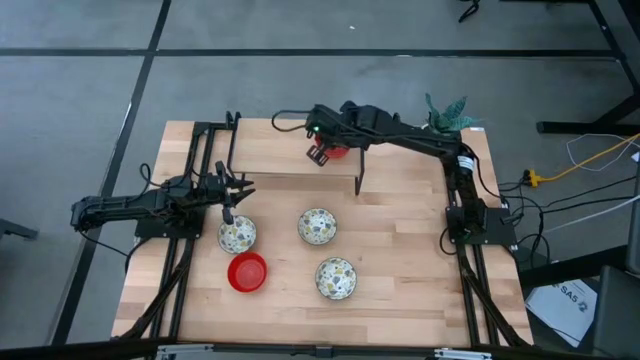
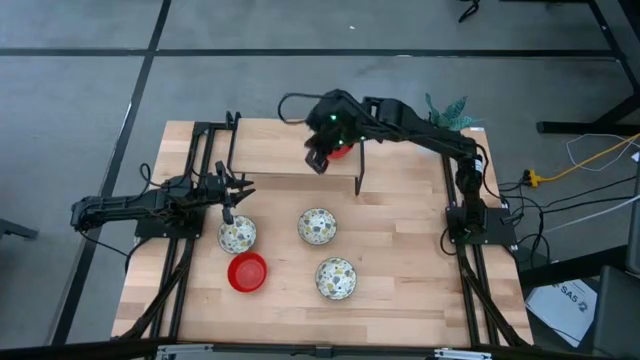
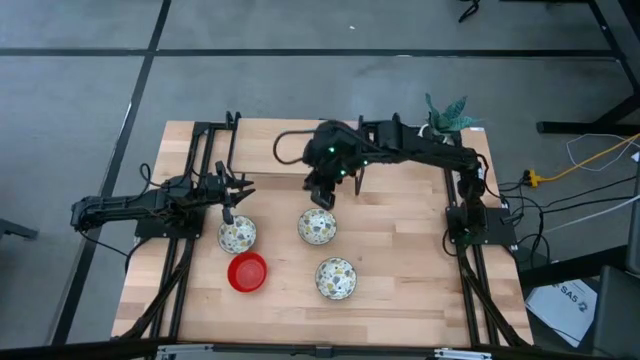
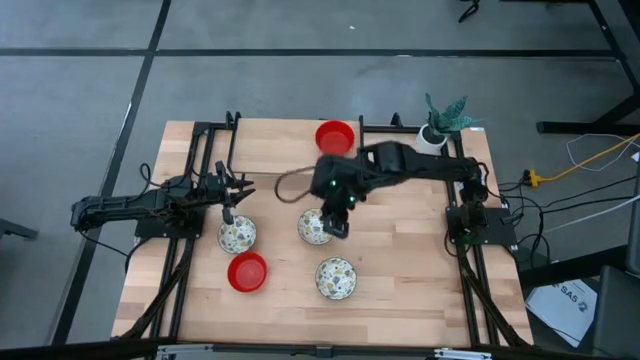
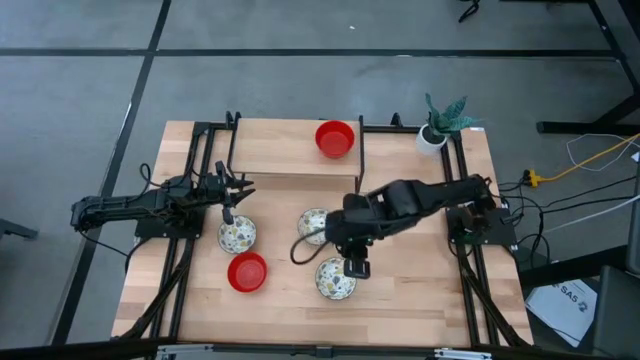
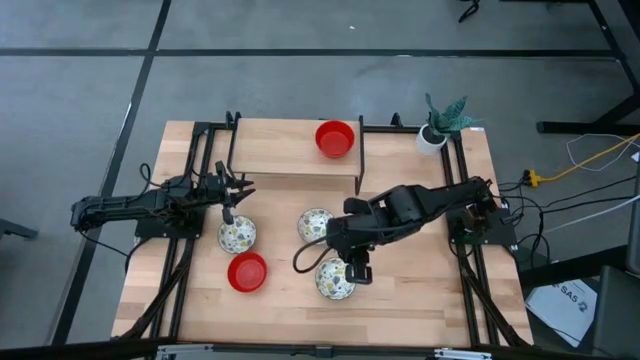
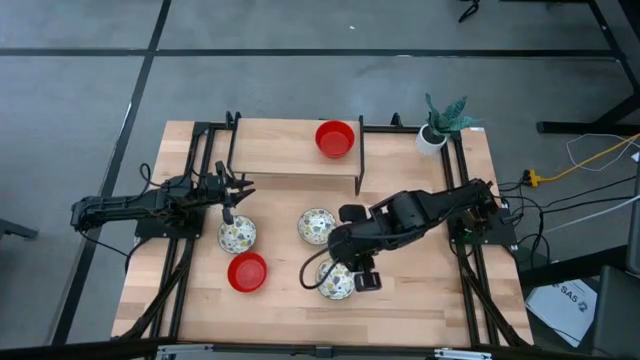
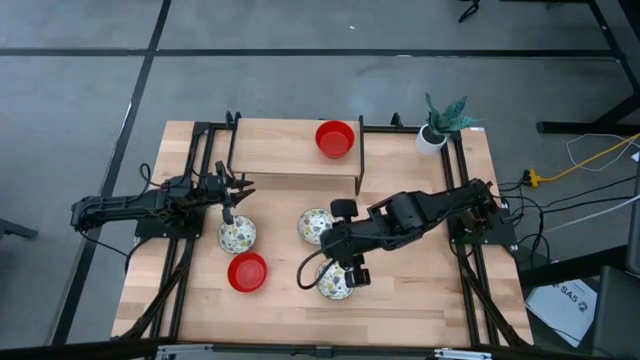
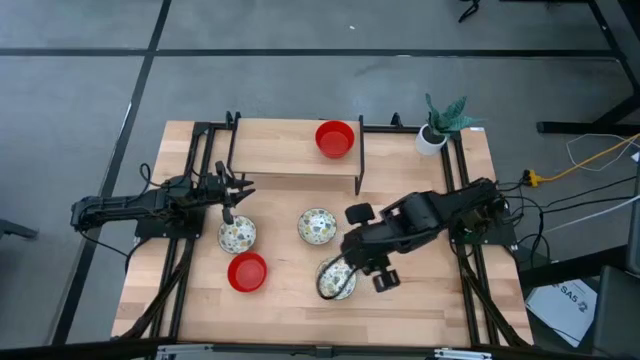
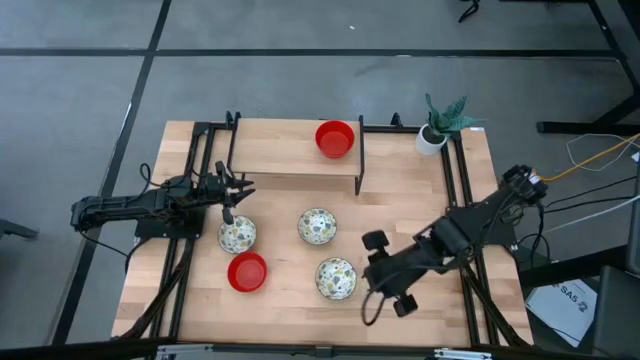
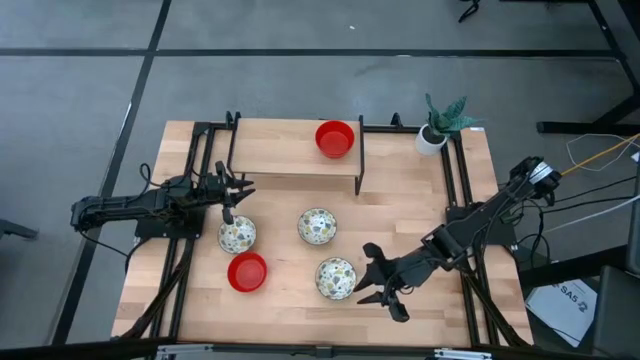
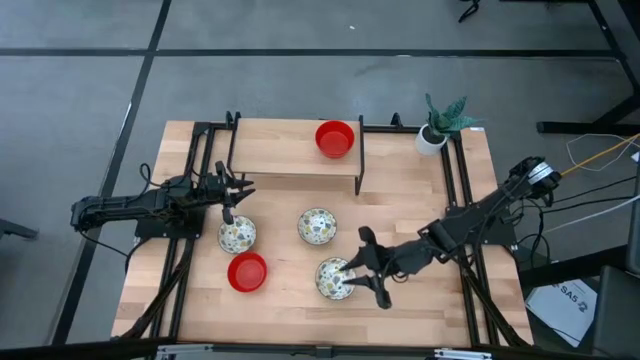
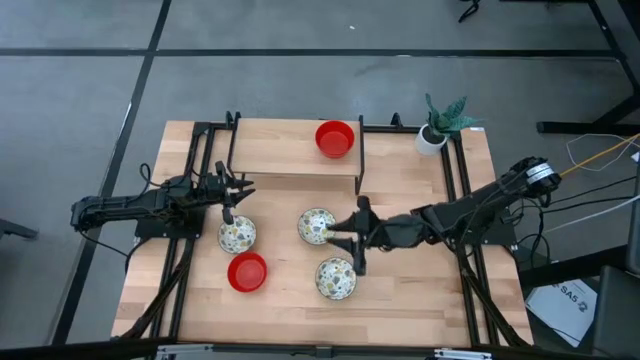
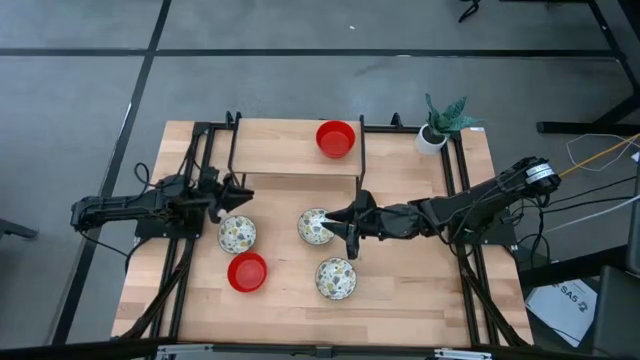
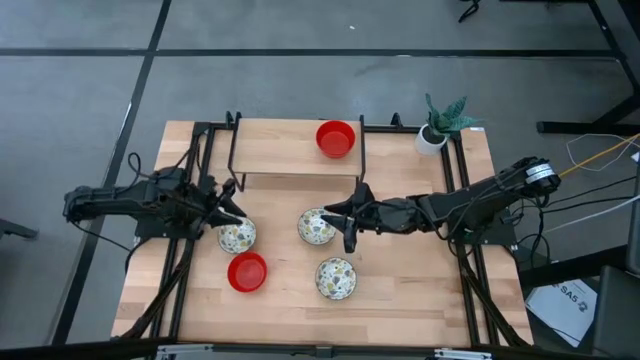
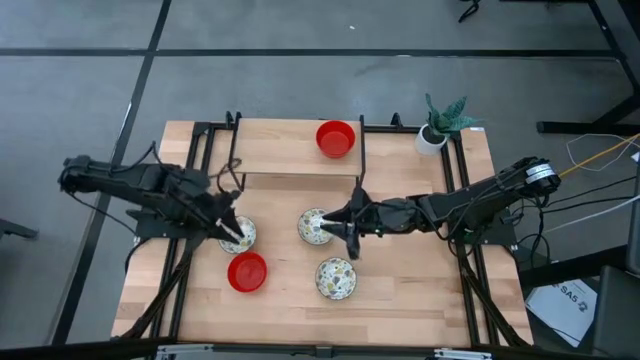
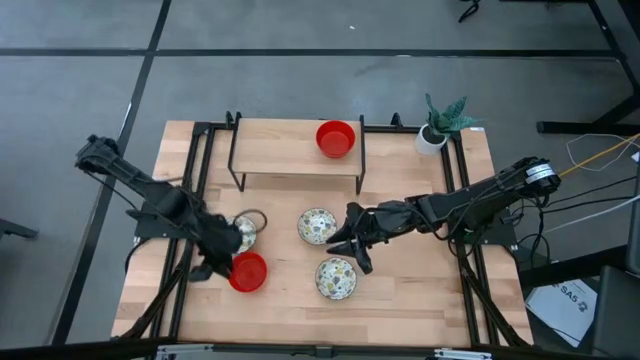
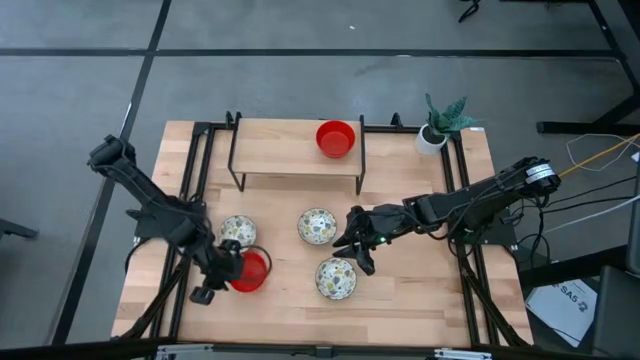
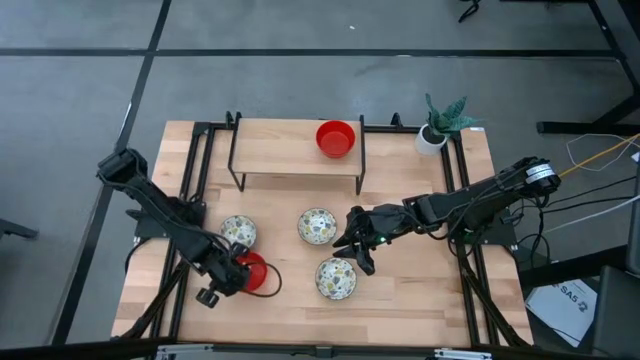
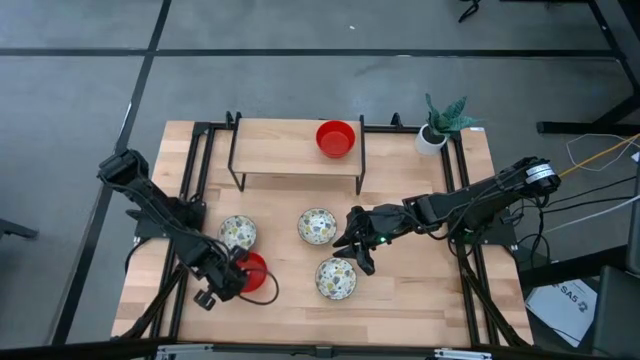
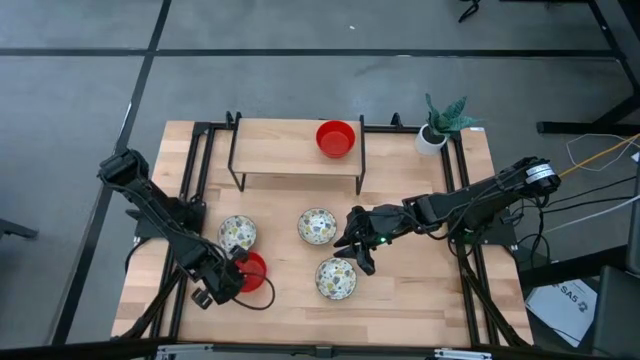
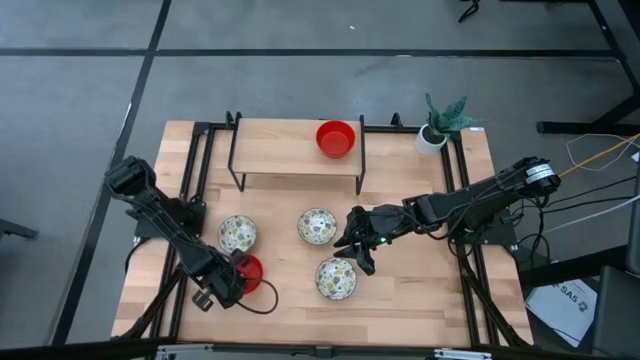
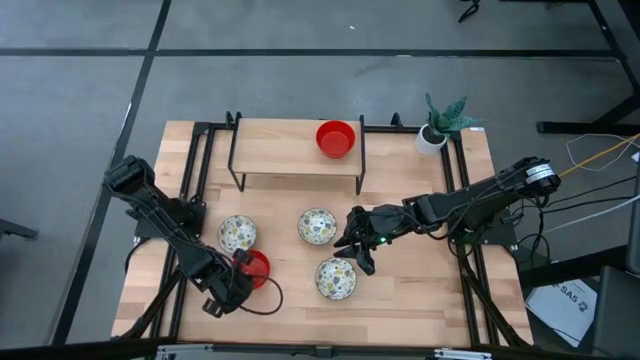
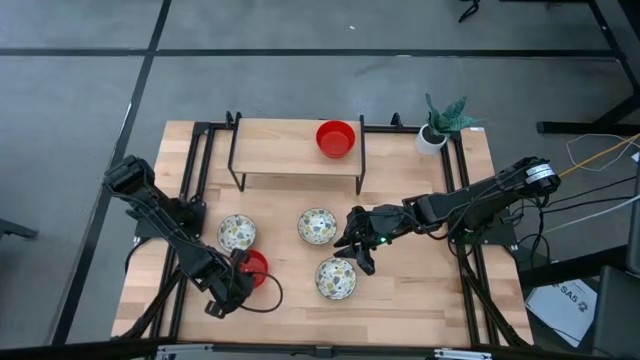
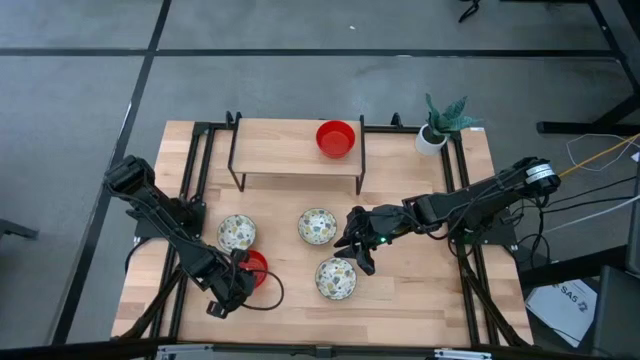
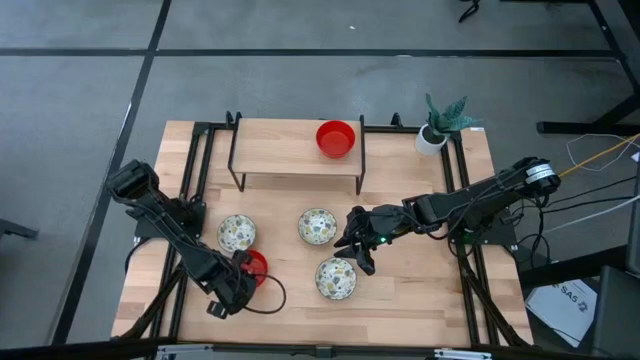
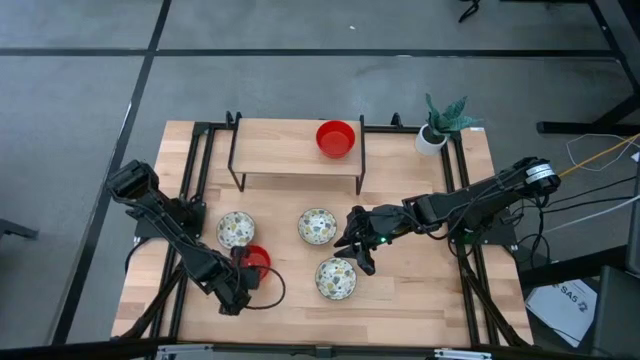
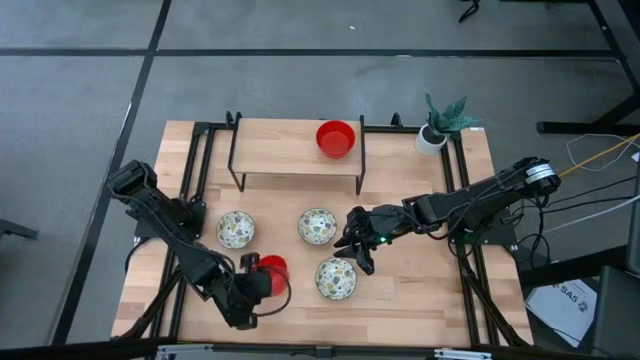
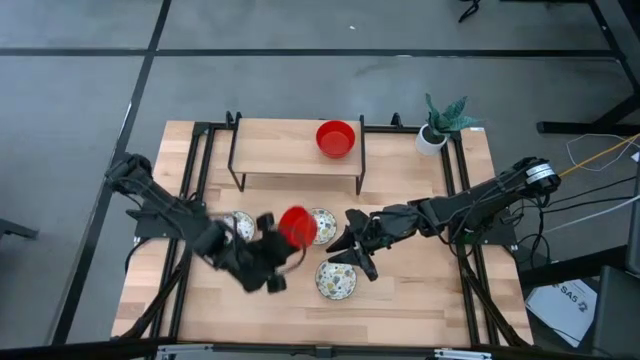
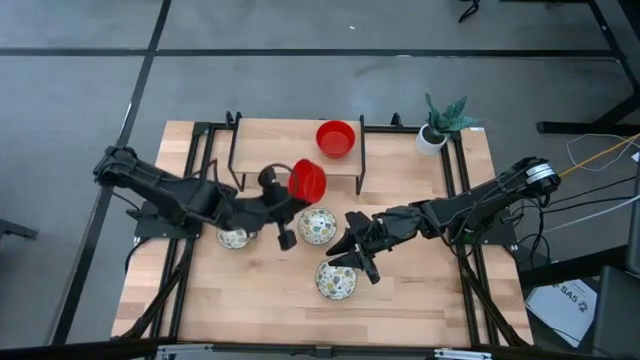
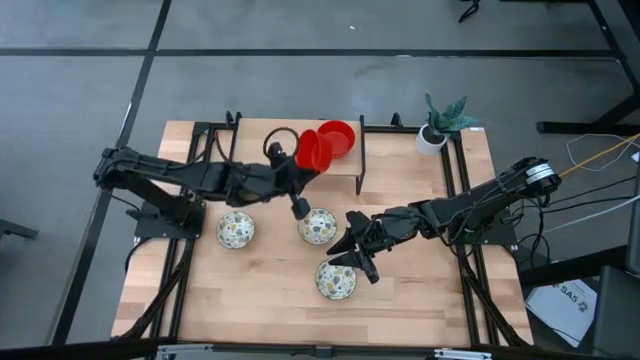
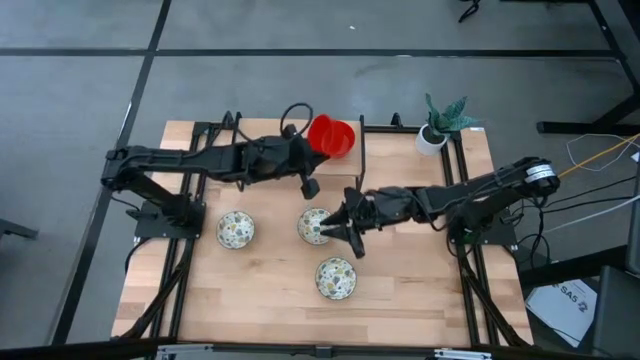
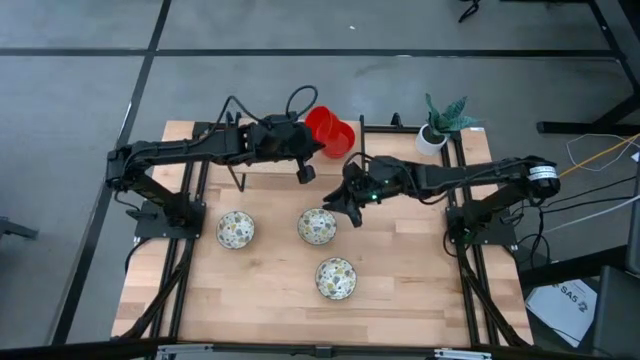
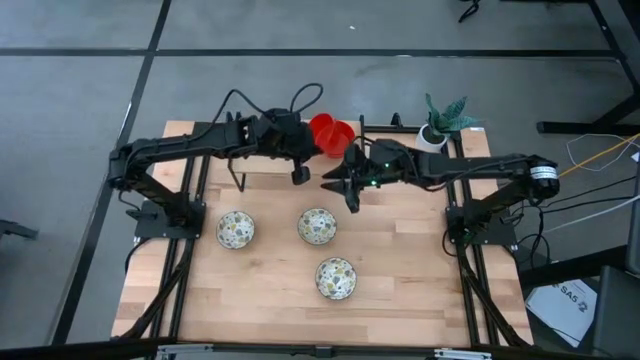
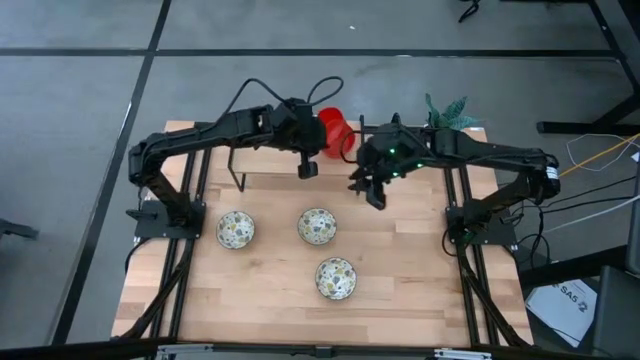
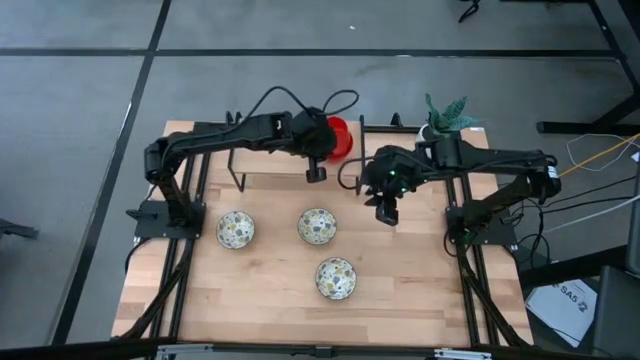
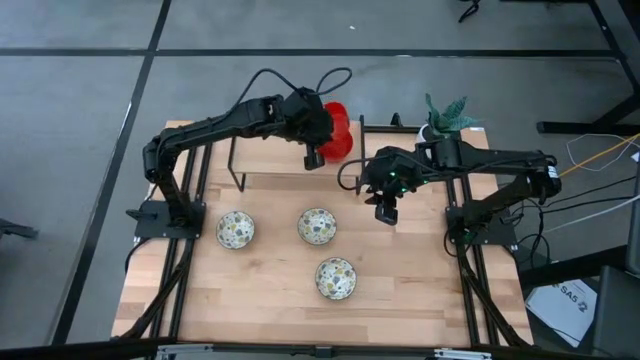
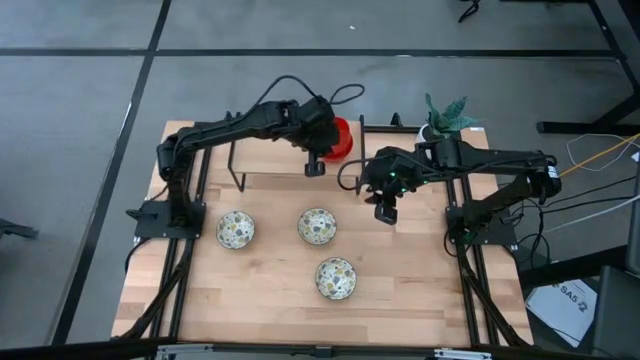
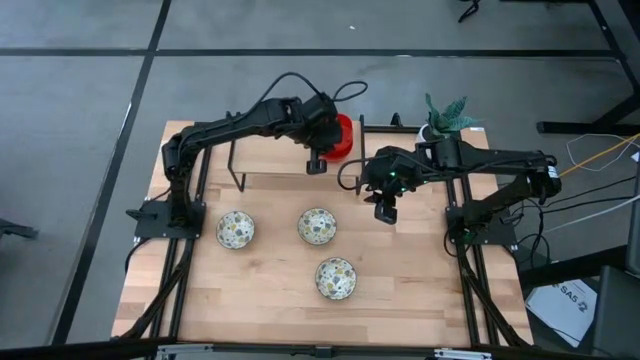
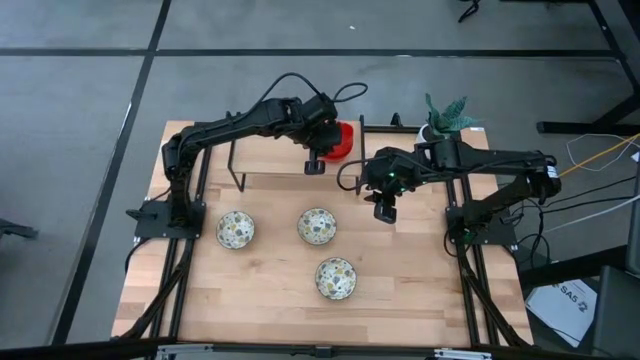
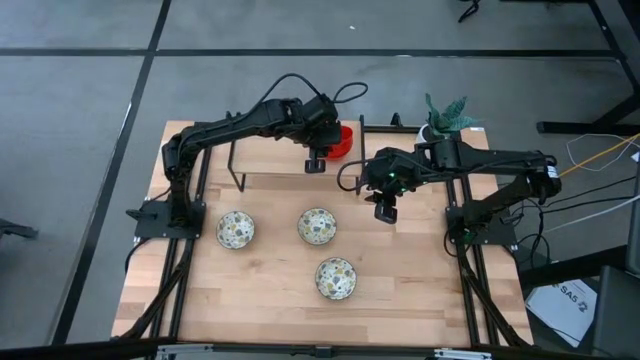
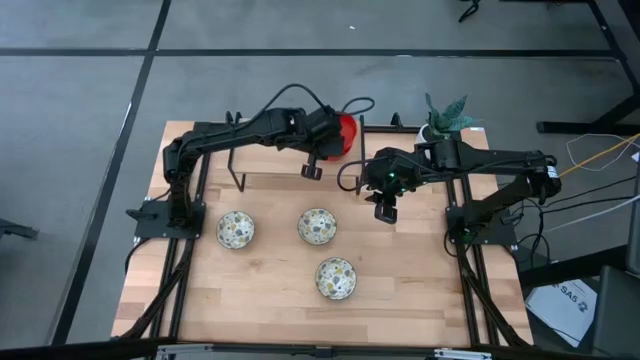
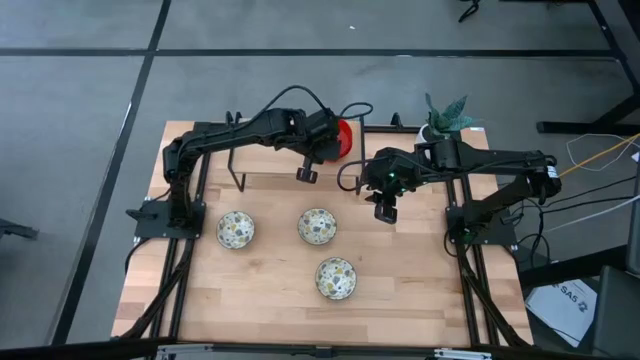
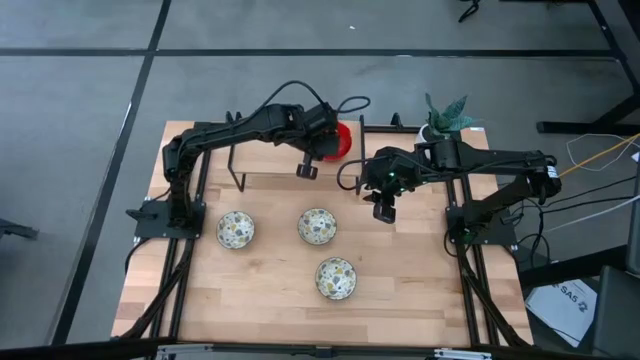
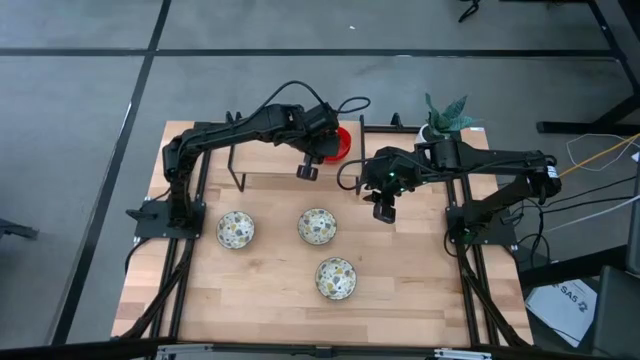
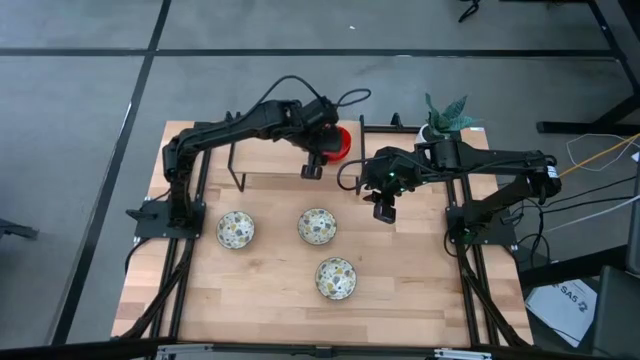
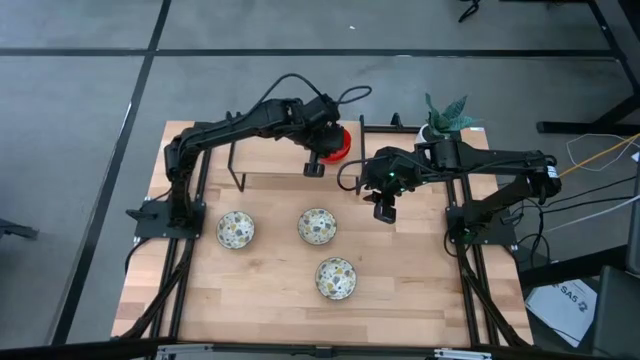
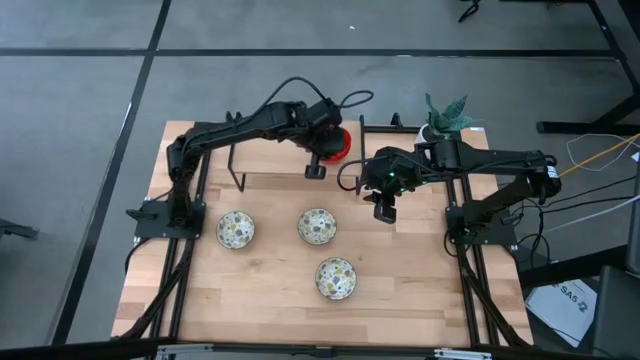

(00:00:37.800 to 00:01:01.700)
Task: Pick & Place Mini bowls
Stack the red bowl on the red bowls on the shelf
